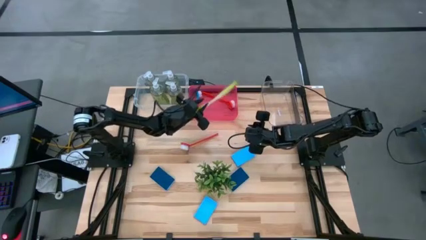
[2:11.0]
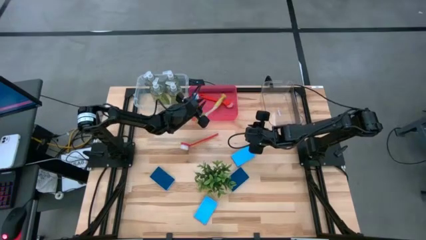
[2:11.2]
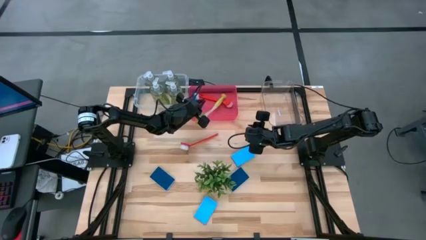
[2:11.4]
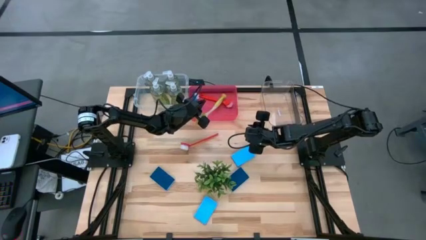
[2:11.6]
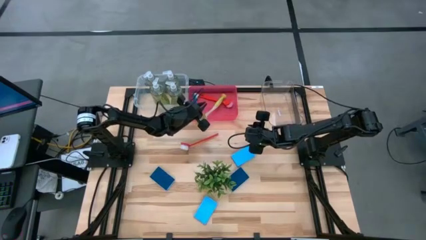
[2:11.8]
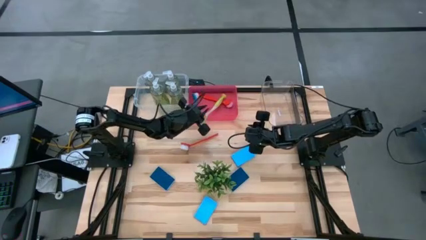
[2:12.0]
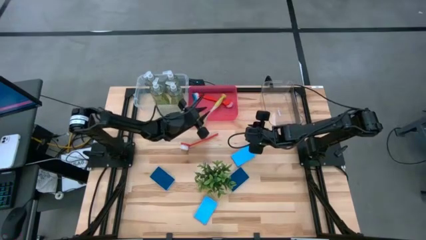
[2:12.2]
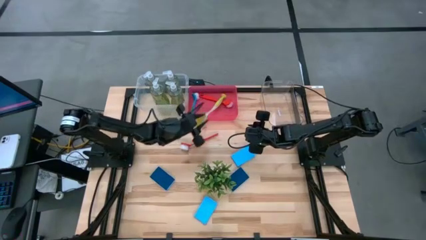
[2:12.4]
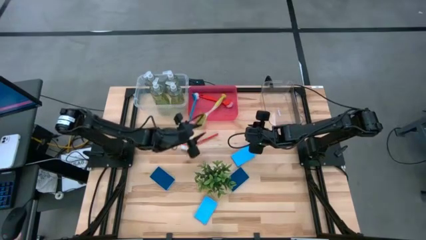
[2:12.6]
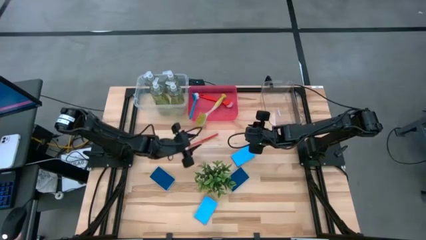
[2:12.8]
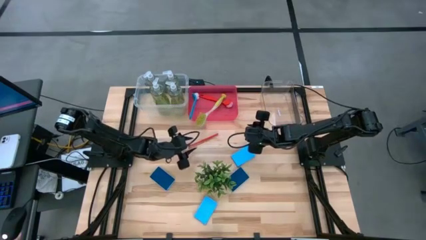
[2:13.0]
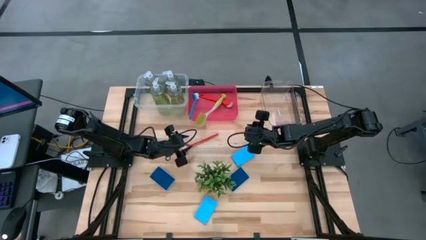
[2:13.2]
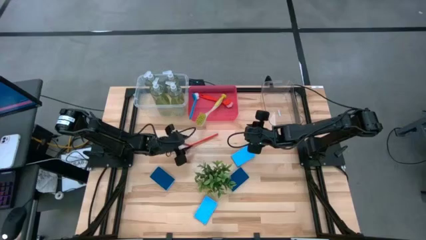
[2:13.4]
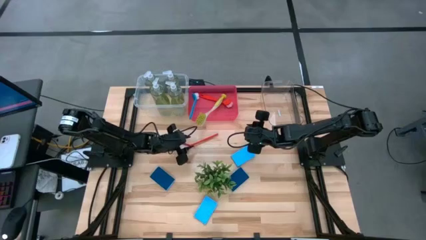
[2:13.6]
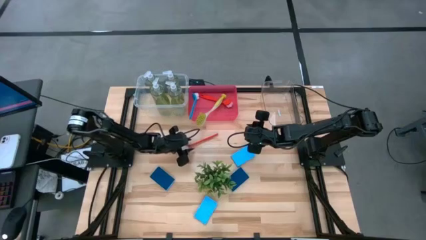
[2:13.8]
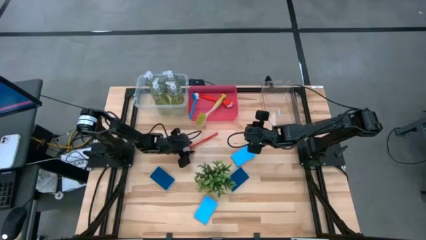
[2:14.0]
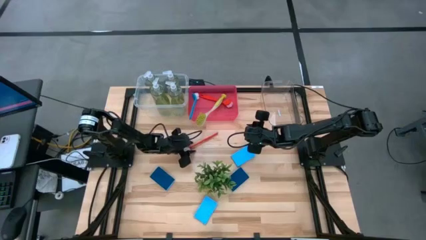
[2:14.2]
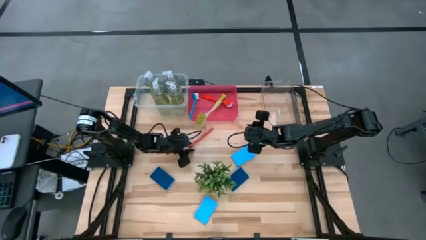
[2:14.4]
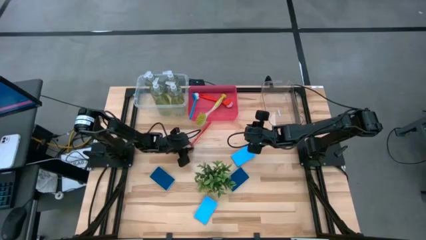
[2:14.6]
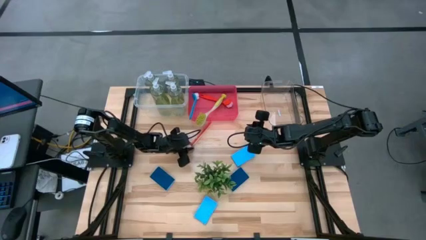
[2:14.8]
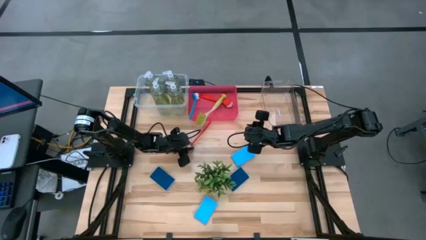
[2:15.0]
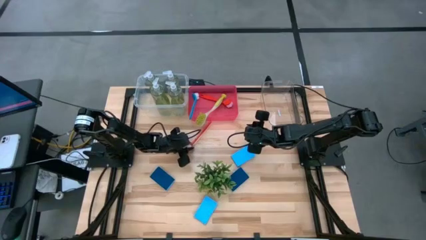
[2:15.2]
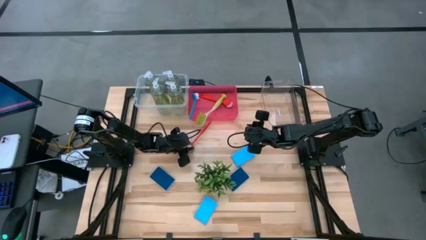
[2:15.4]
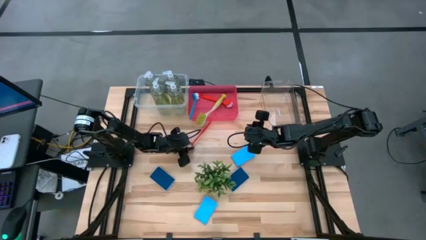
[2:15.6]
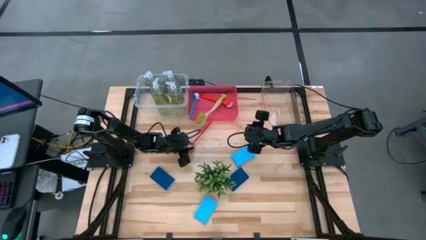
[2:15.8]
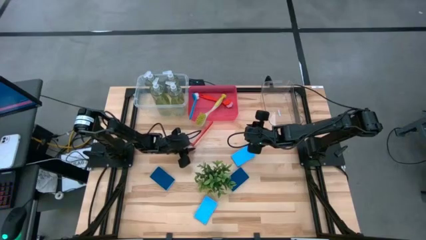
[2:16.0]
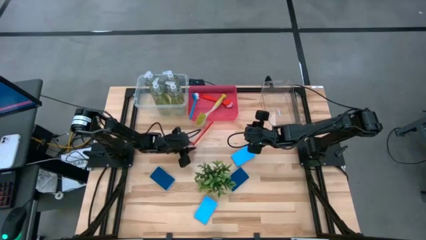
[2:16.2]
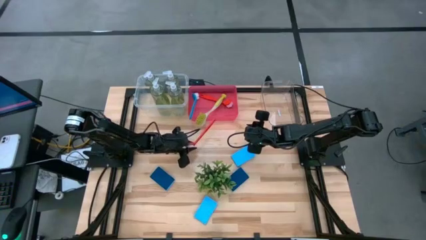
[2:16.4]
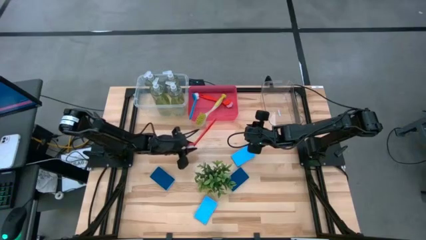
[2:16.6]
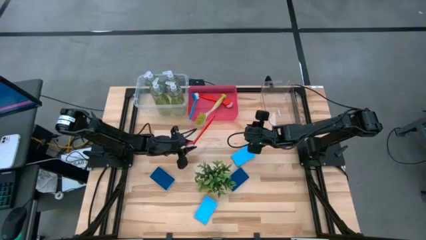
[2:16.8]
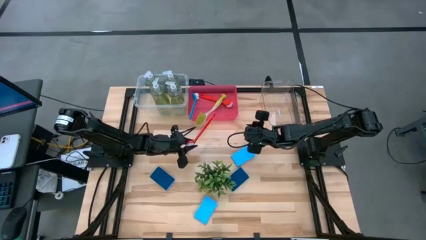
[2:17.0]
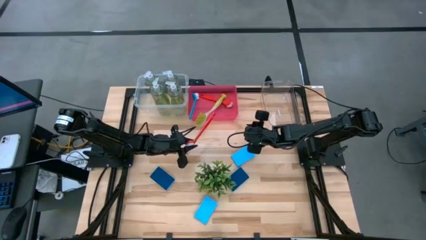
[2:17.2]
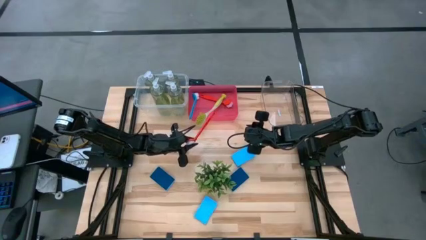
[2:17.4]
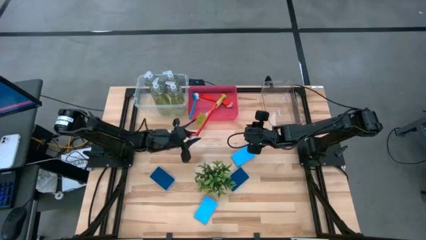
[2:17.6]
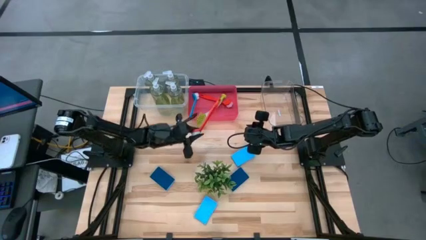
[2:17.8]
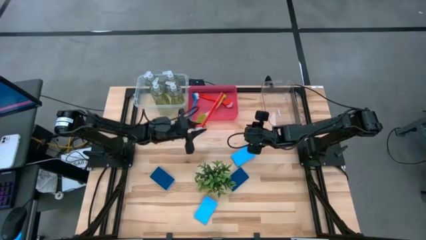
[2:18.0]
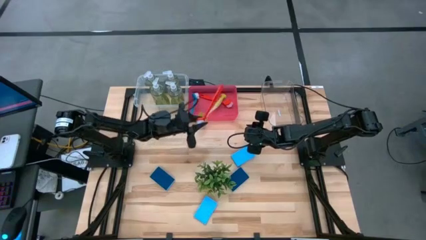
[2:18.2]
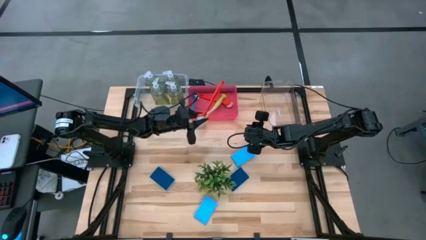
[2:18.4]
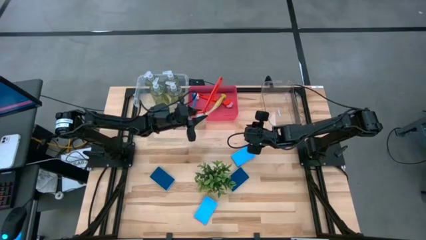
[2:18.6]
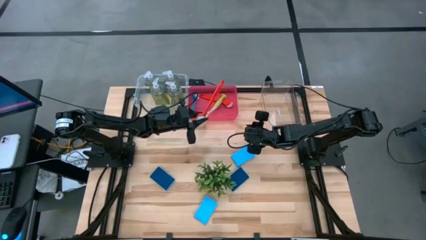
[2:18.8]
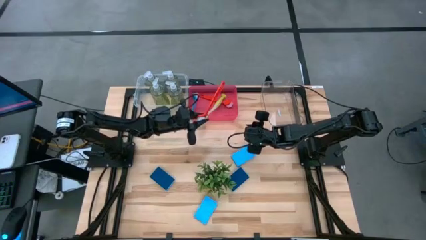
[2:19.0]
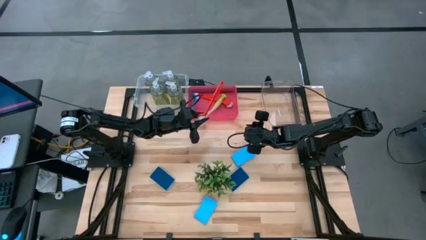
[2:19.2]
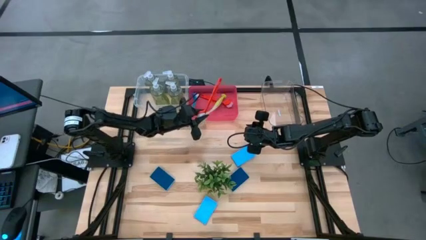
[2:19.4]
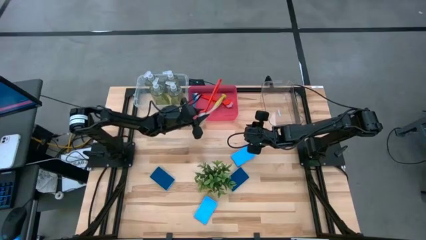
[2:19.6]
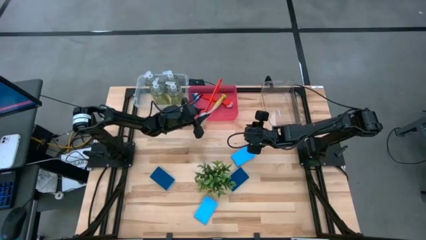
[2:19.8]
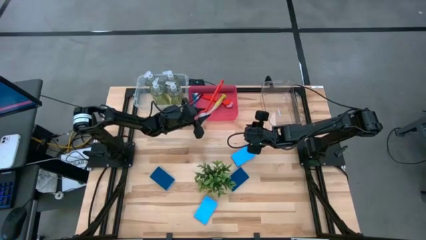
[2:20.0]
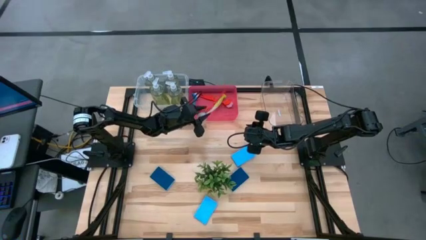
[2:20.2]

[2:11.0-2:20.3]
Task: Pick & Place Kitchen Sink Supplies
Put the red dish brush into the red bin

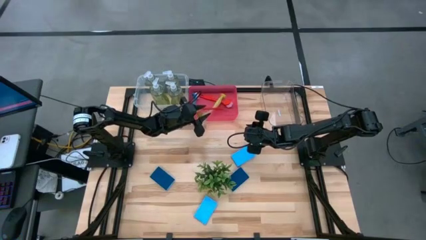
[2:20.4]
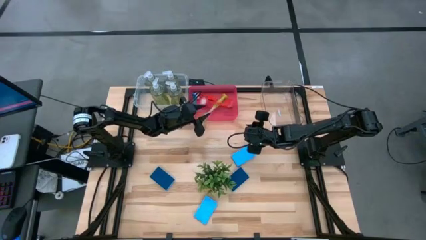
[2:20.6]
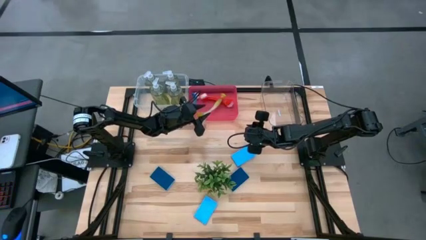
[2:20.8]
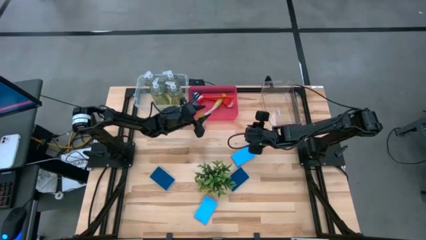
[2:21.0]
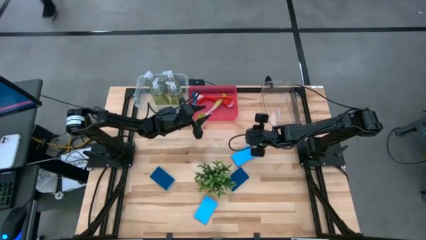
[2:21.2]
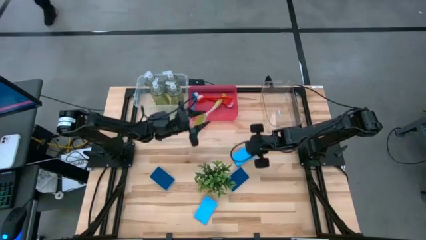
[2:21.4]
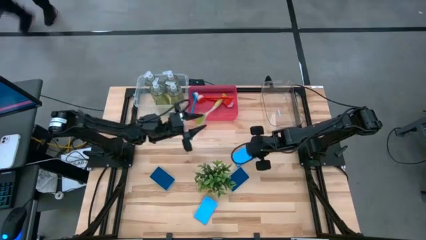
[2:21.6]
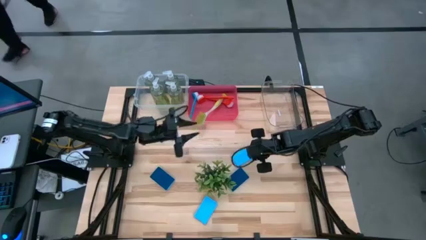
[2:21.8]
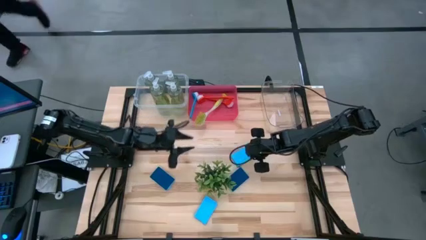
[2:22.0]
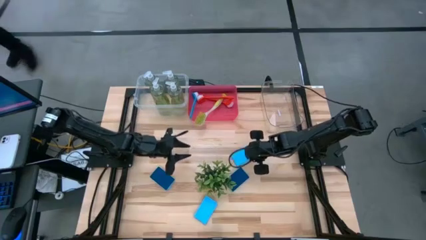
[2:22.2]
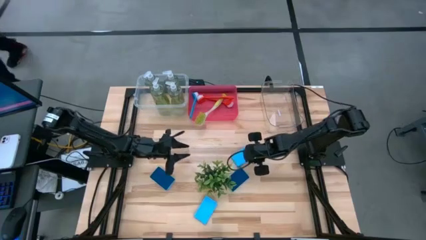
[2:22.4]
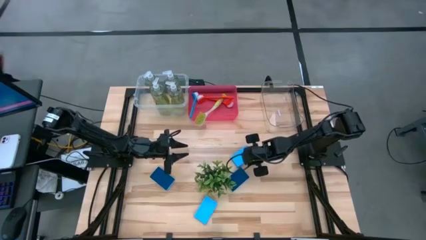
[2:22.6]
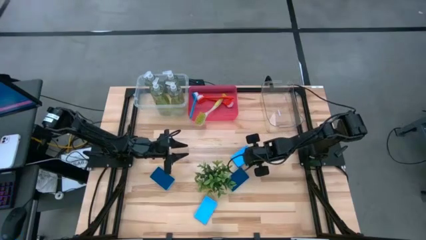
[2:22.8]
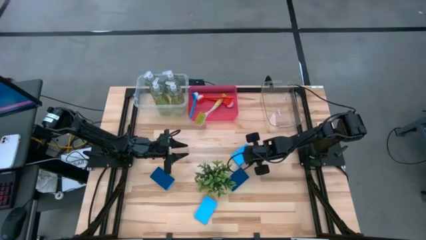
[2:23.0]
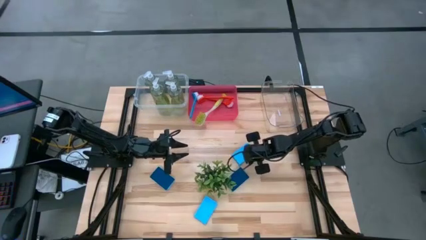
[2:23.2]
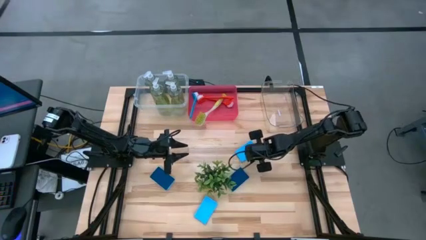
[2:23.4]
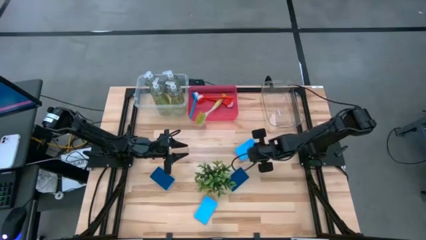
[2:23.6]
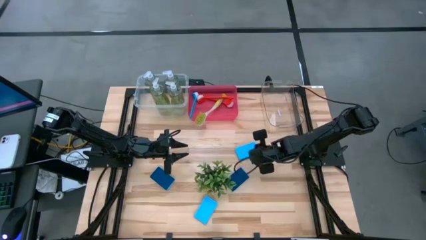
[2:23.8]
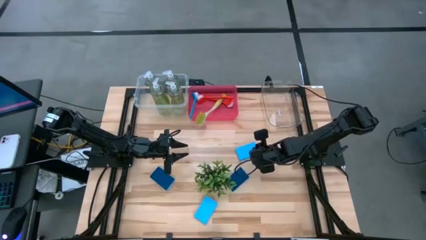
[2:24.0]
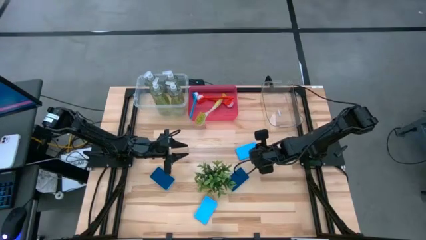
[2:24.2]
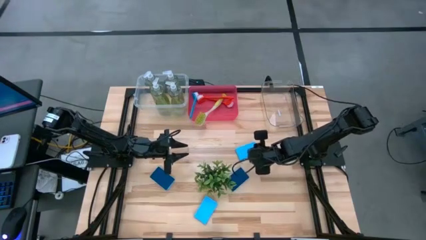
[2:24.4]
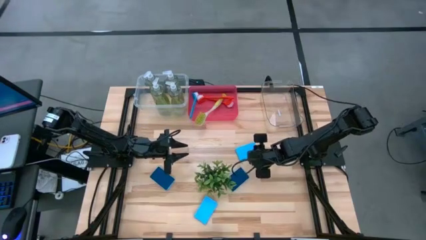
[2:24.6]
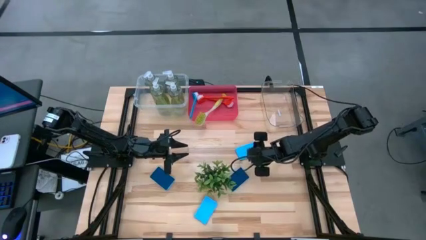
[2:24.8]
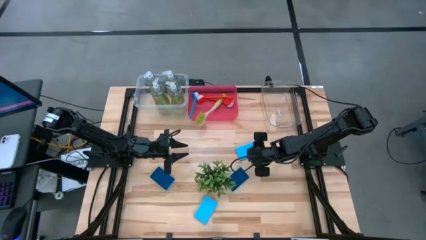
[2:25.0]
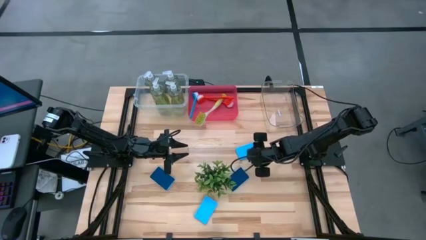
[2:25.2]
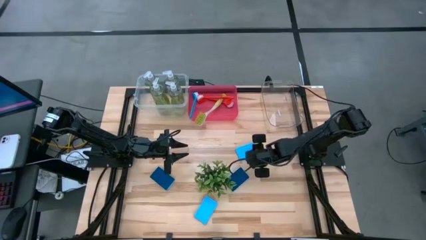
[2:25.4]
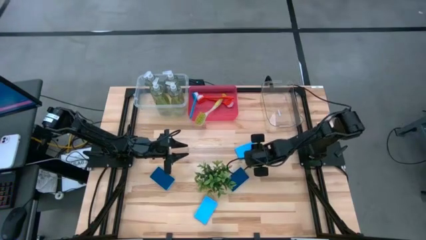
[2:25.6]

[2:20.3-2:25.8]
Put the blue sponge into the transparent bin

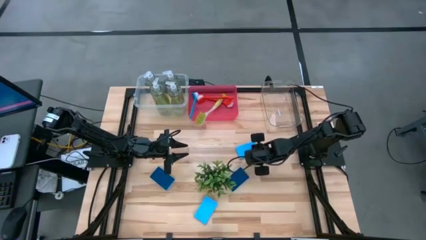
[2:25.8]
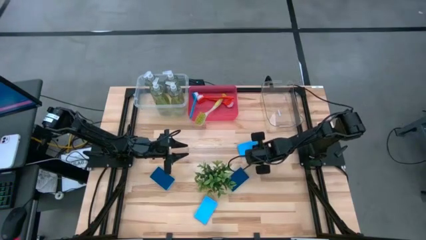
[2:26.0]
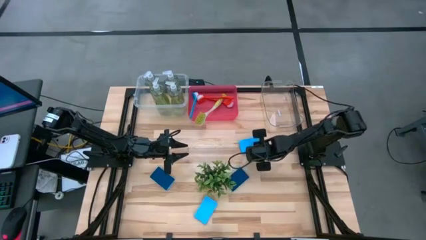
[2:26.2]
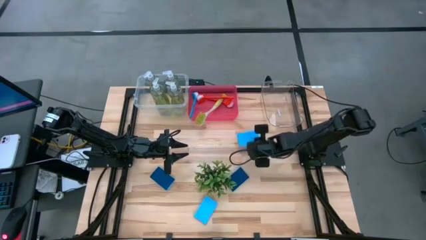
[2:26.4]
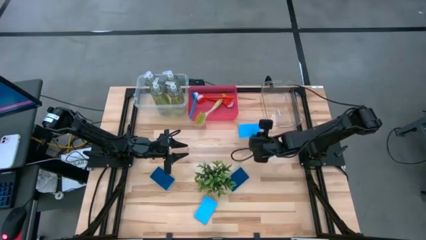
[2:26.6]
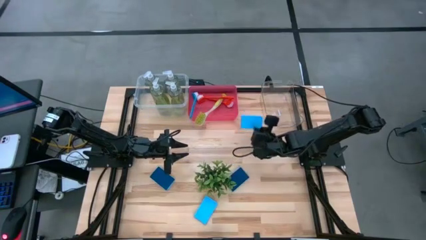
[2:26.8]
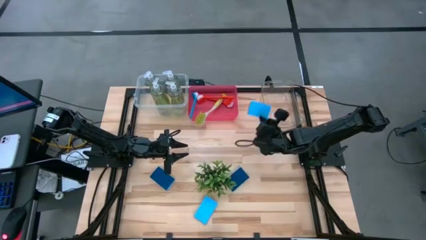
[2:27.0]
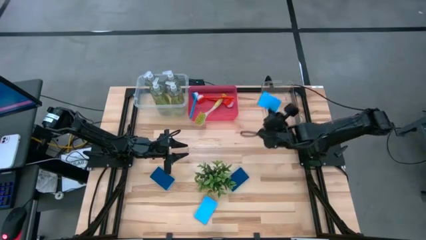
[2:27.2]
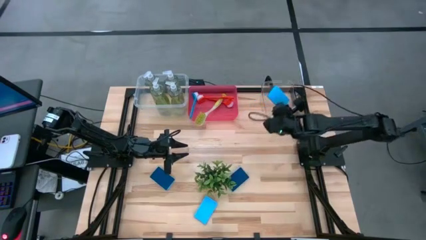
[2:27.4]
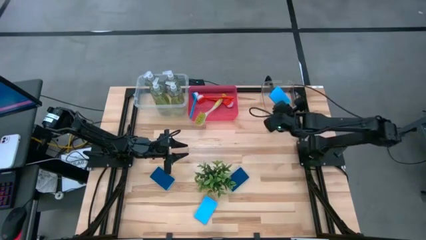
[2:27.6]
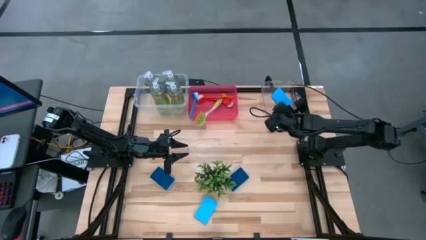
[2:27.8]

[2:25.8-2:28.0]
Put the blue sponge into the transparent bin
